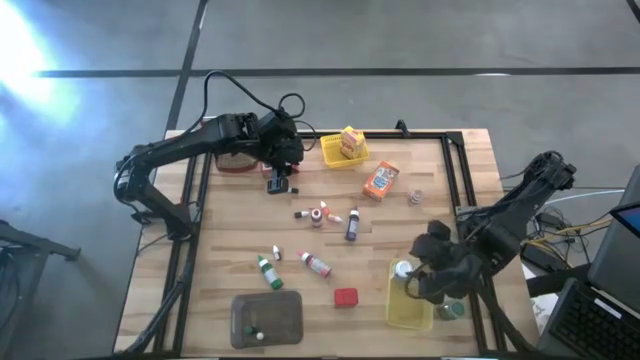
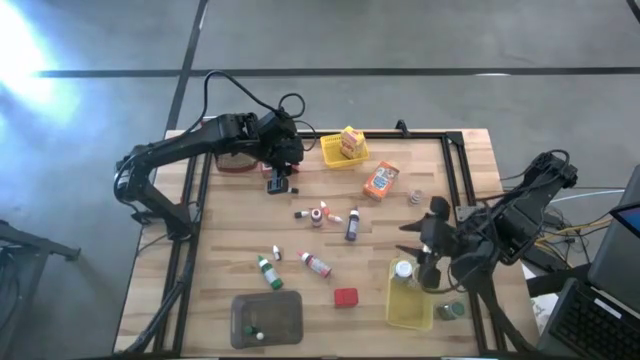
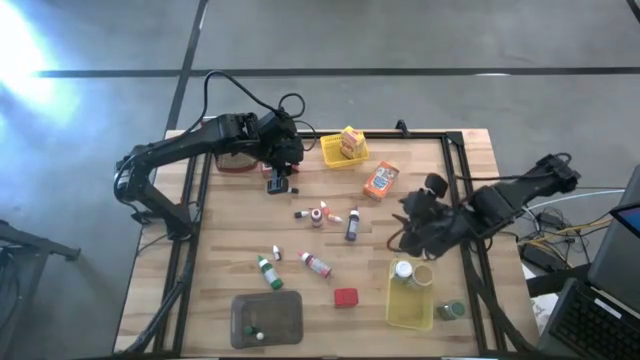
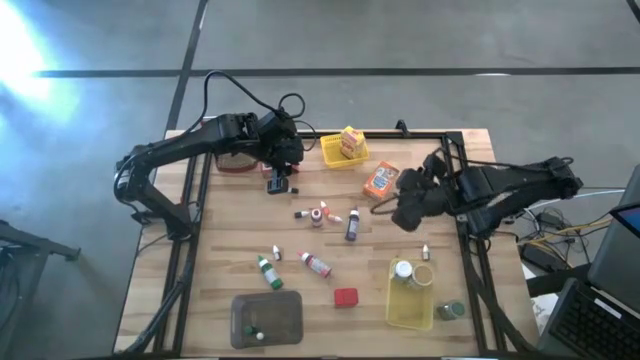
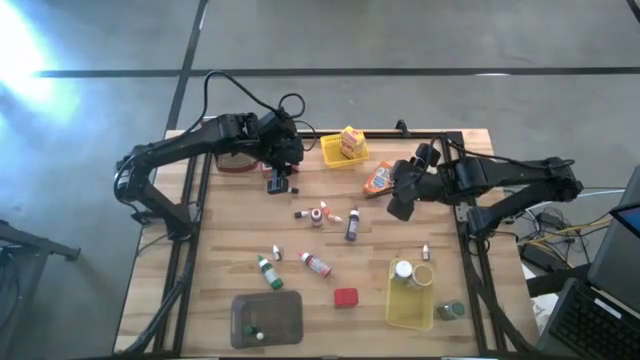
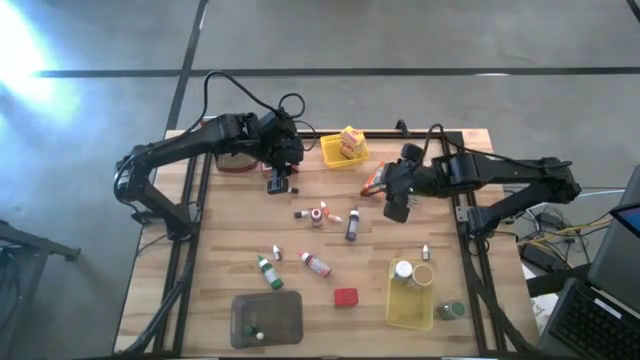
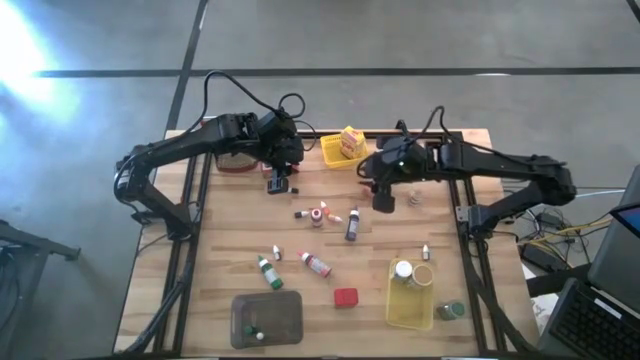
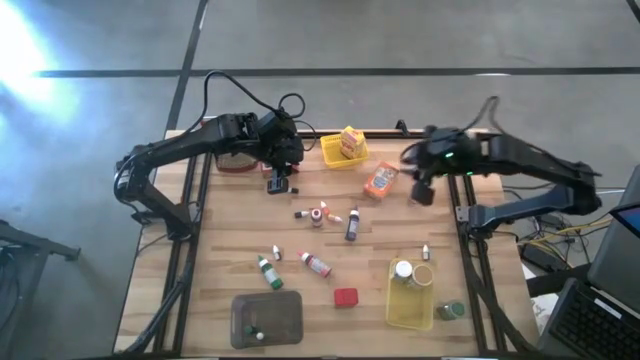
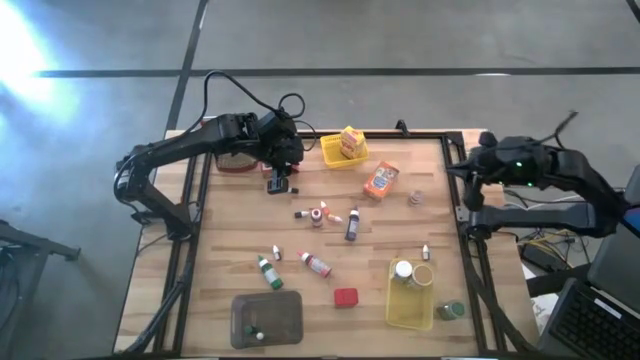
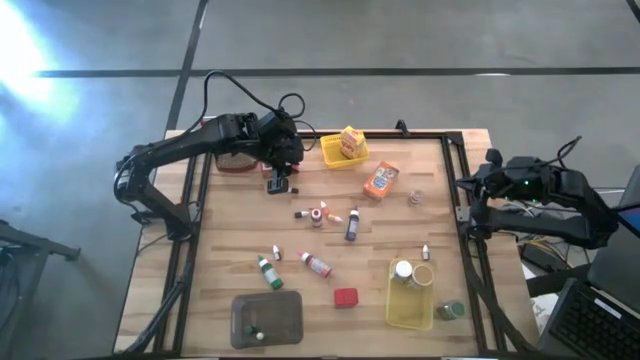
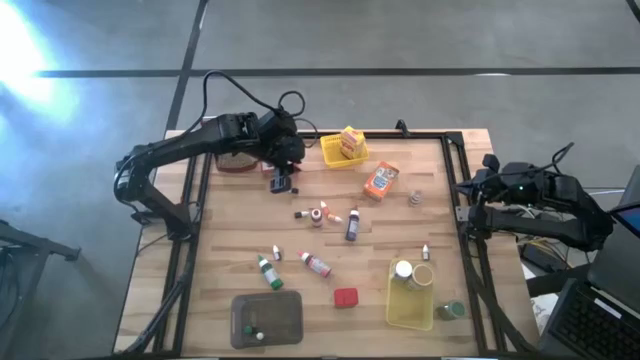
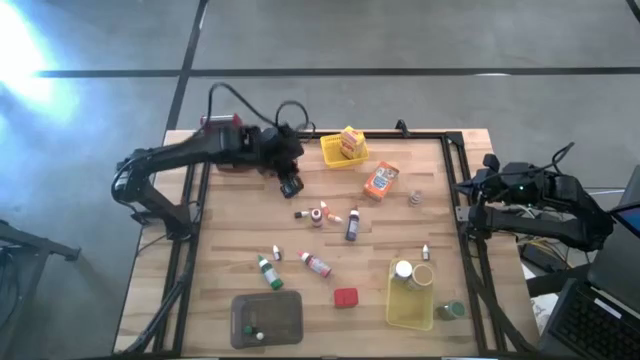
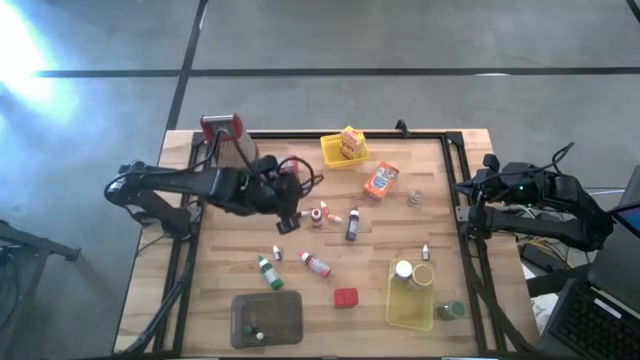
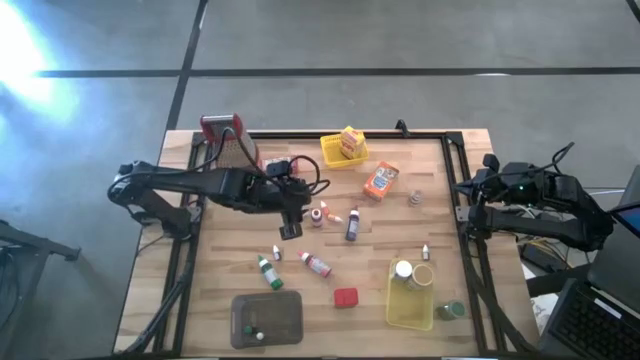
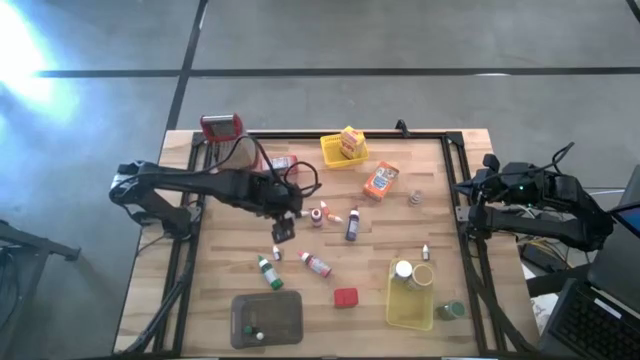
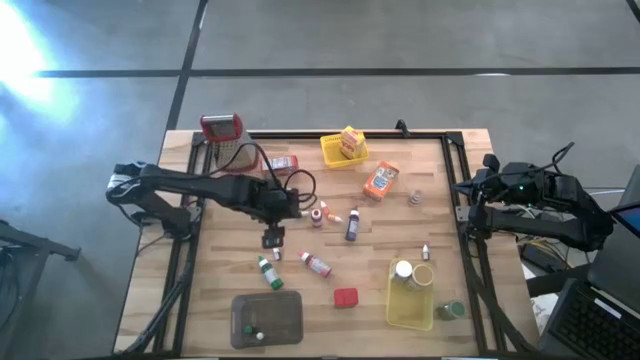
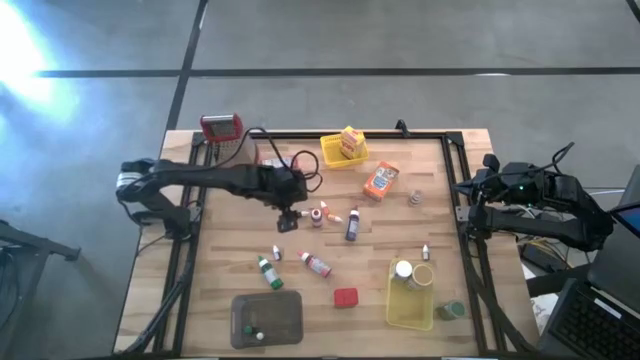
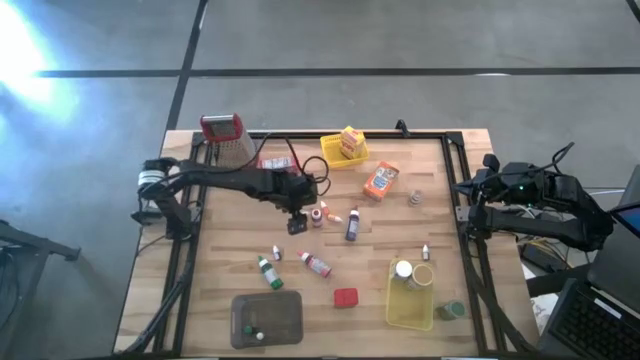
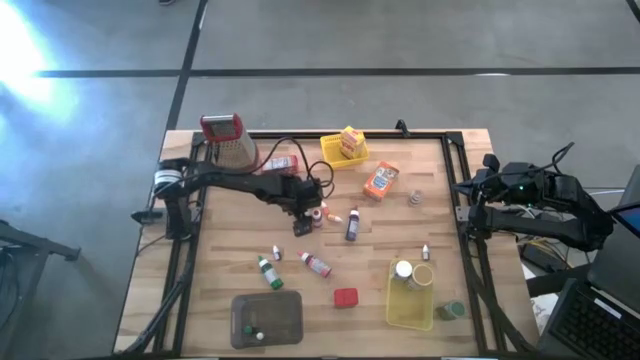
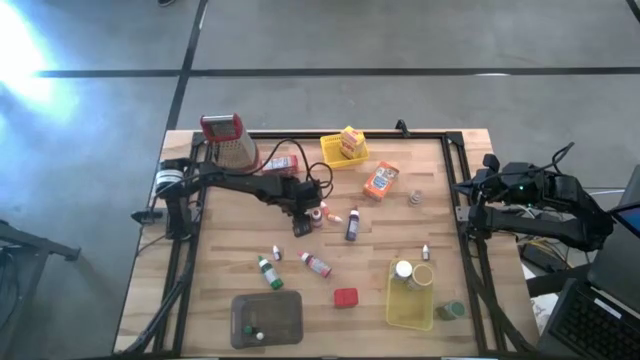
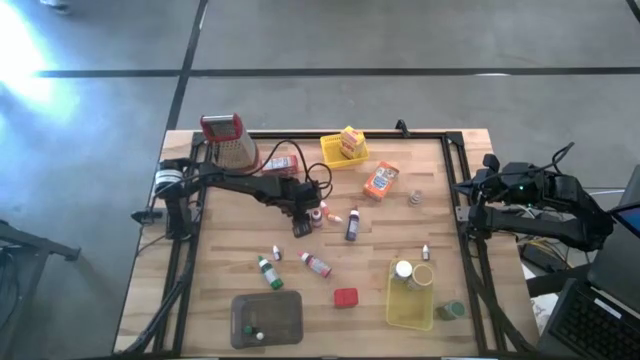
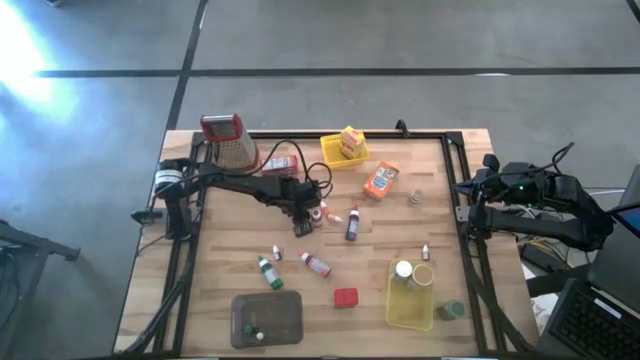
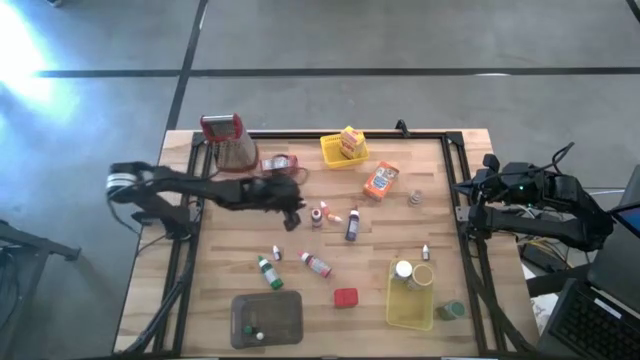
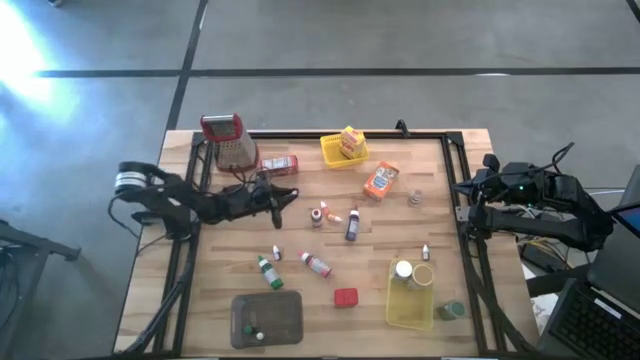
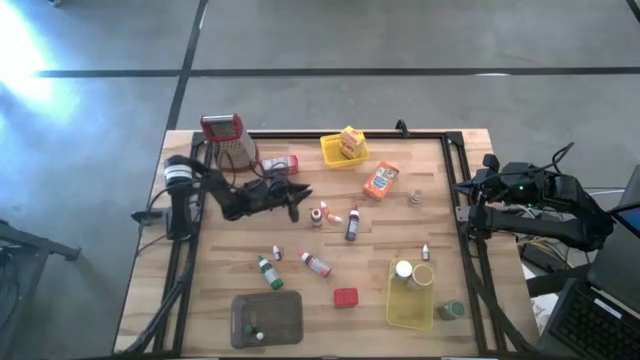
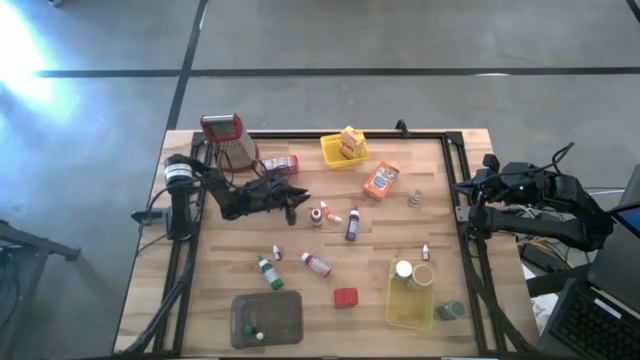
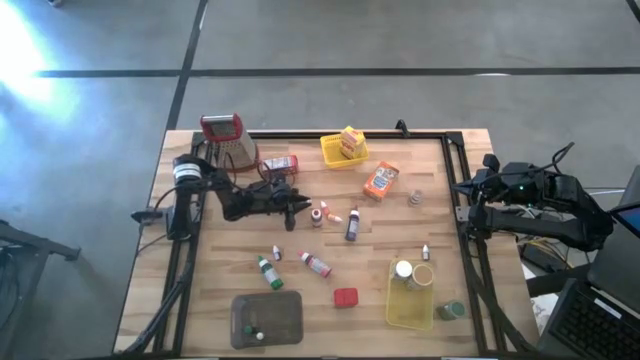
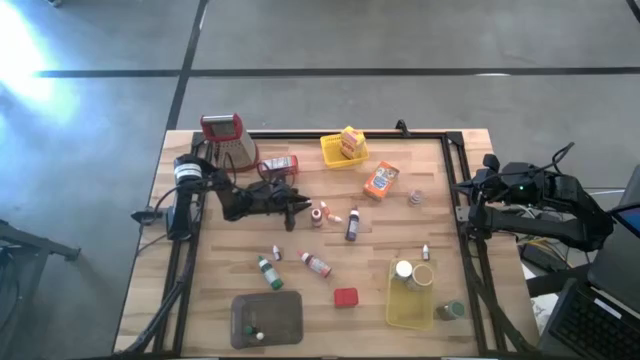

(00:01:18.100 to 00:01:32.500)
Task: Pick & Place Kitchen Items
Put the black food coloring bottle into the black bin

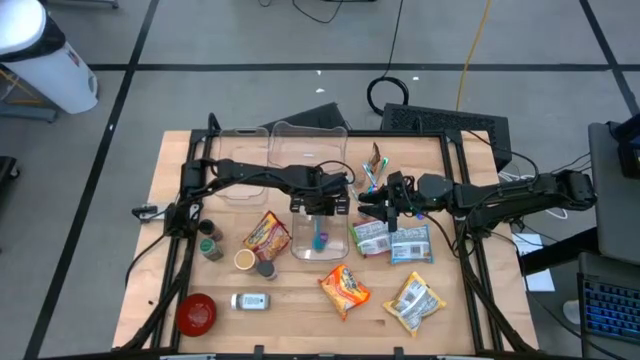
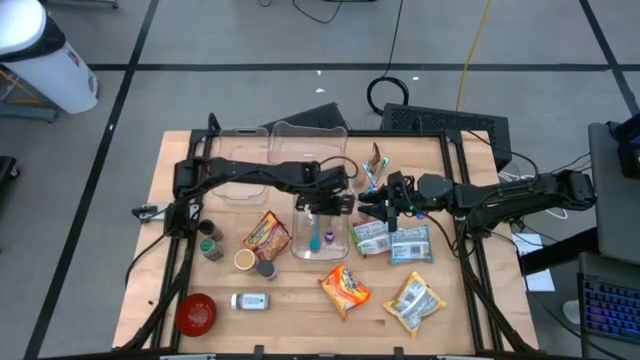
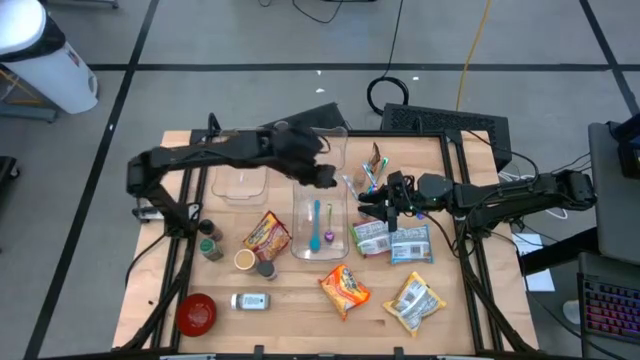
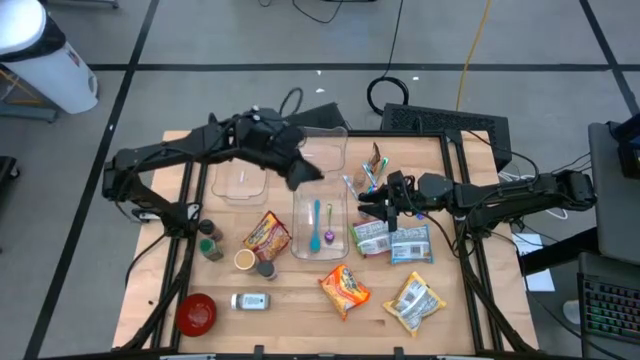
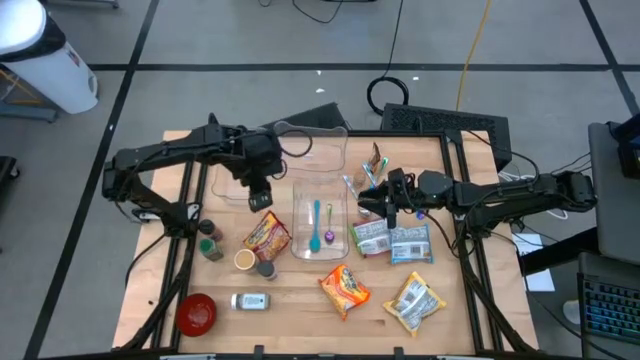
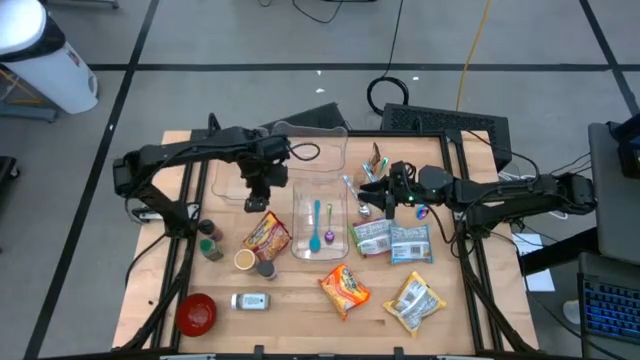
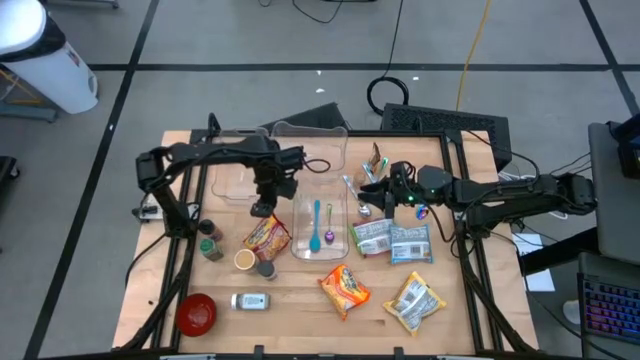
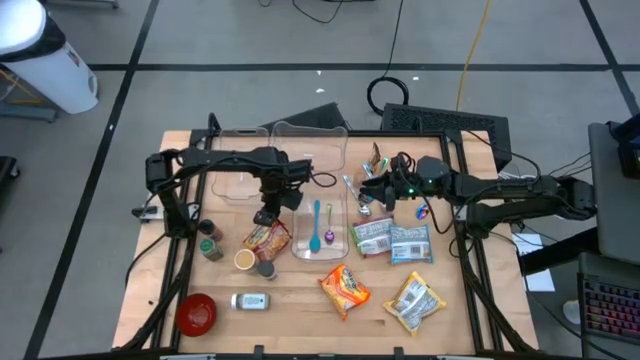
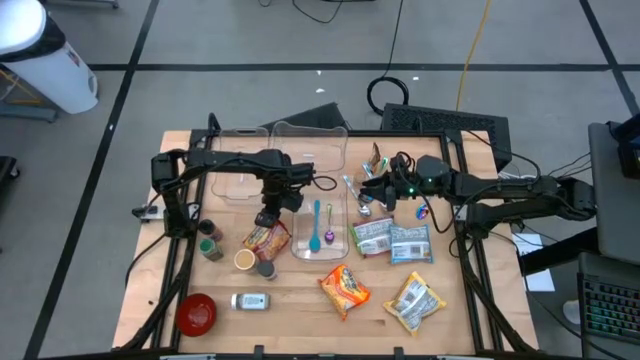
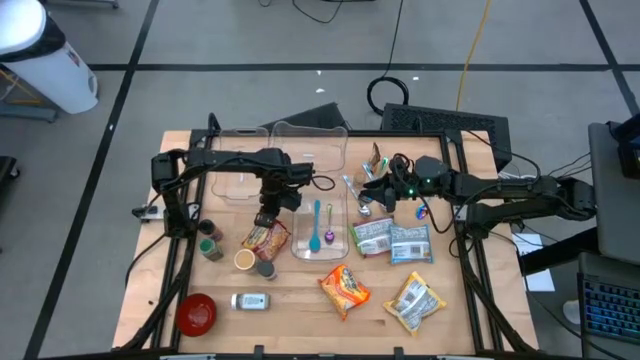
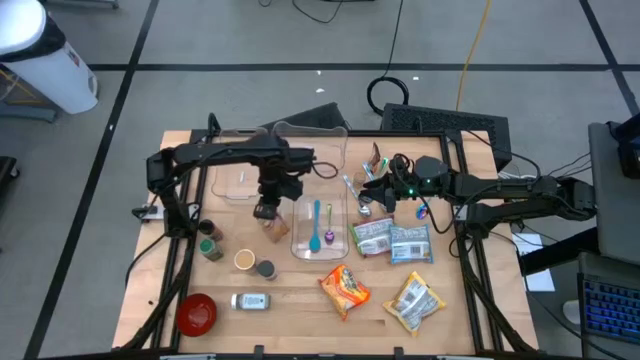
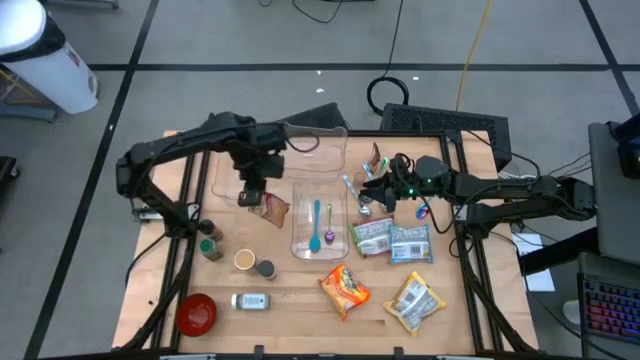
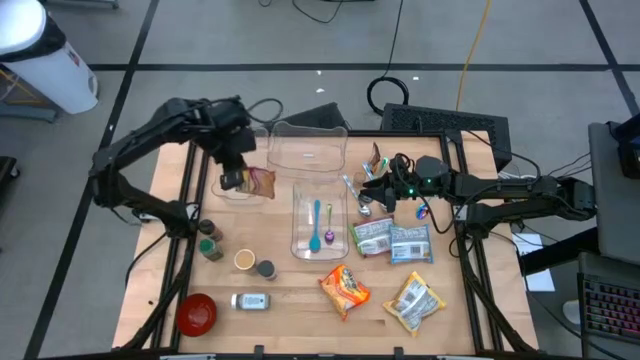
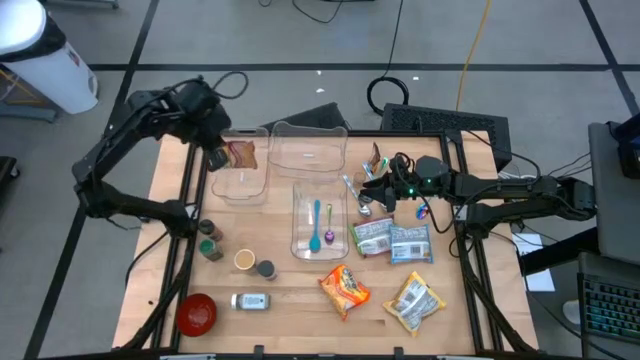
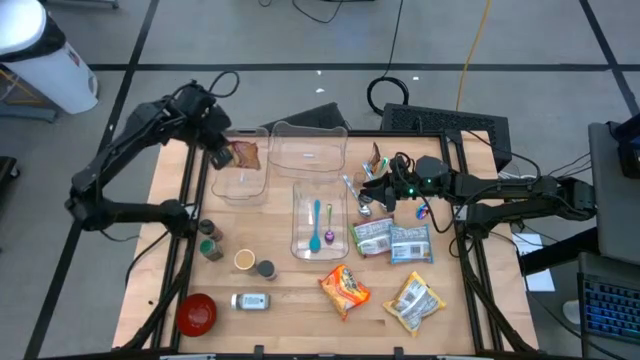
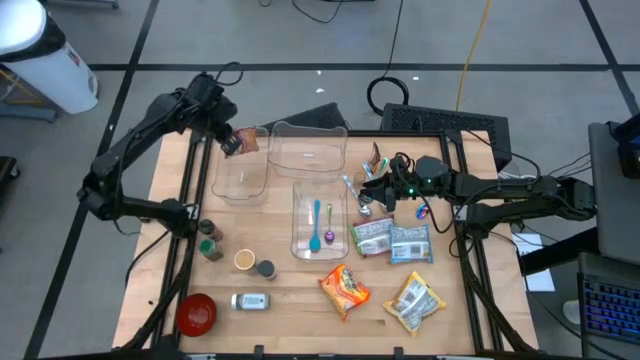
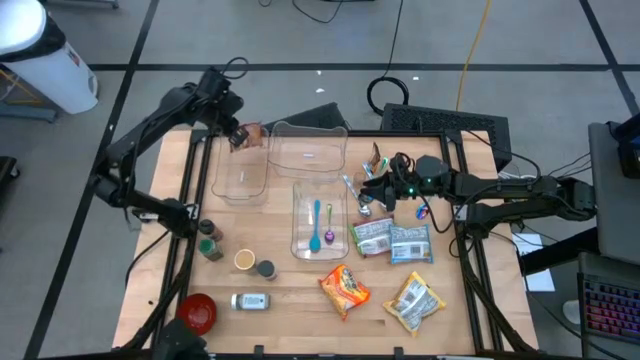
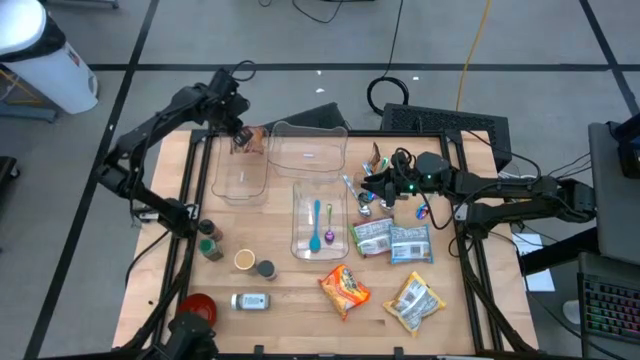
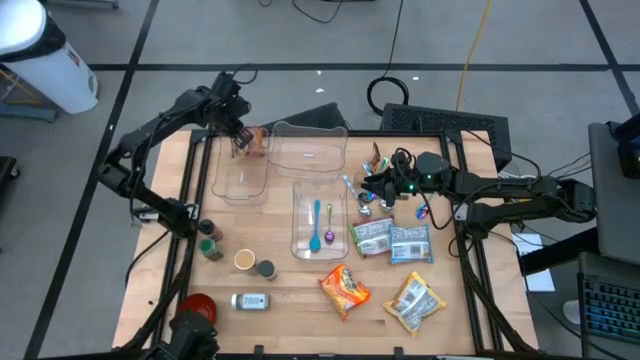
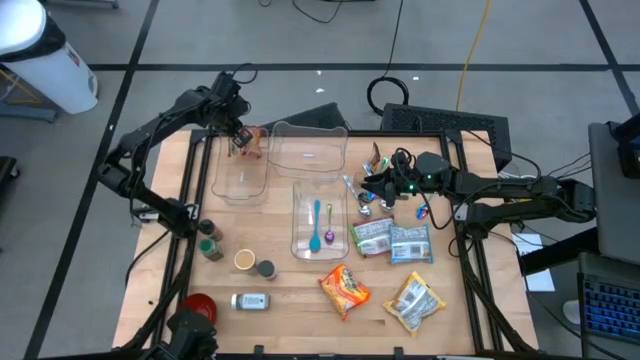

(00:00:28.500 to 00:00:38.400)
Task: Pick & Place Food Item
Put the red noodle pack into the top left transparent bin
